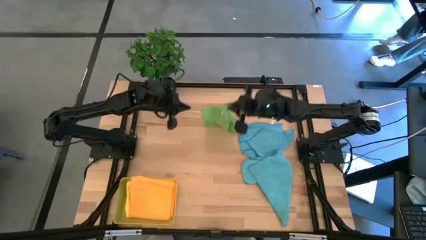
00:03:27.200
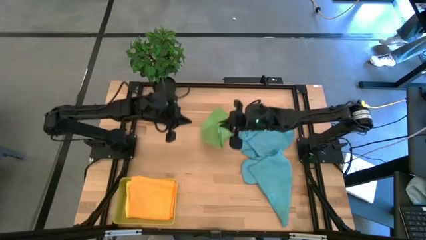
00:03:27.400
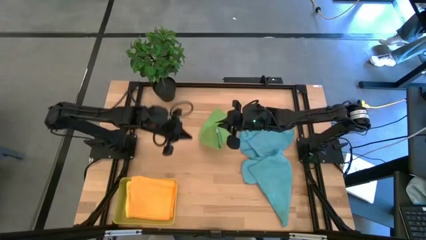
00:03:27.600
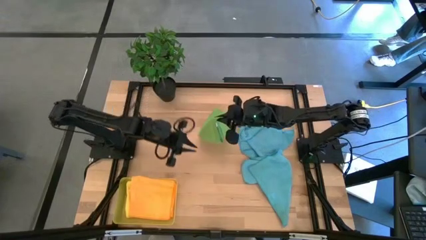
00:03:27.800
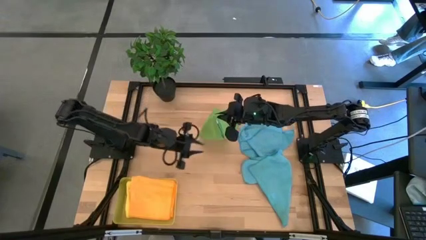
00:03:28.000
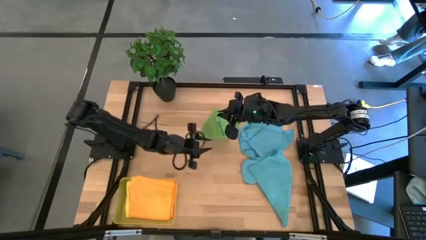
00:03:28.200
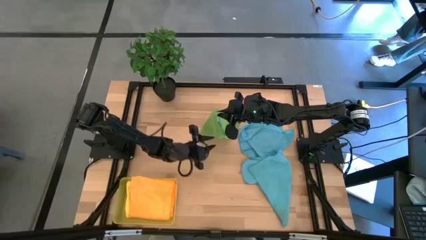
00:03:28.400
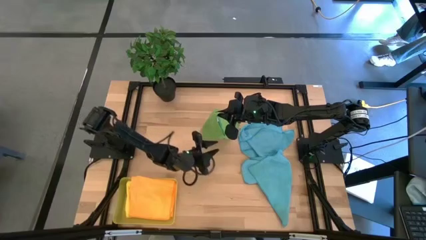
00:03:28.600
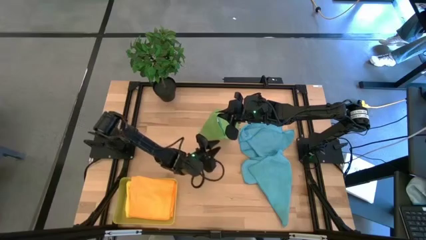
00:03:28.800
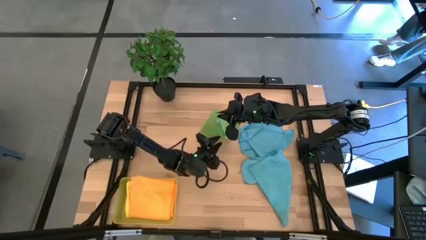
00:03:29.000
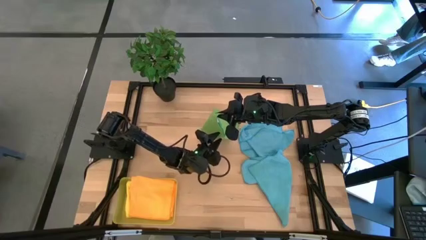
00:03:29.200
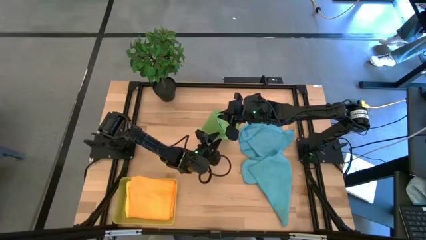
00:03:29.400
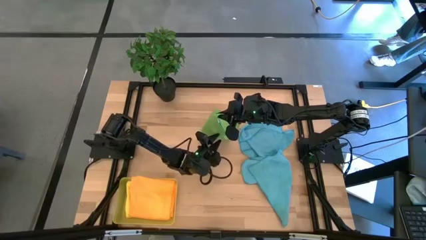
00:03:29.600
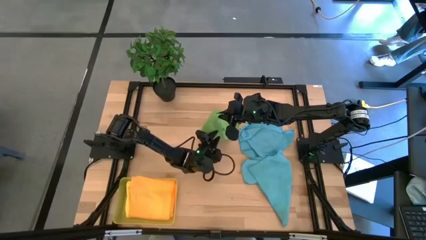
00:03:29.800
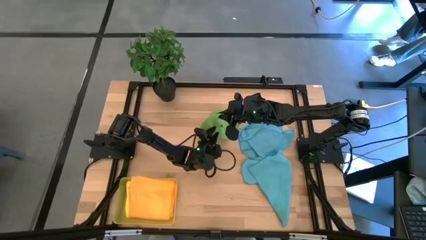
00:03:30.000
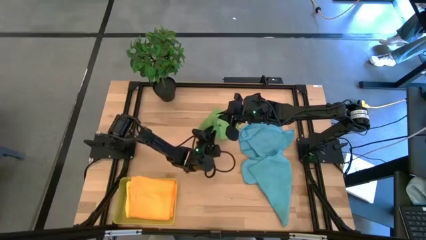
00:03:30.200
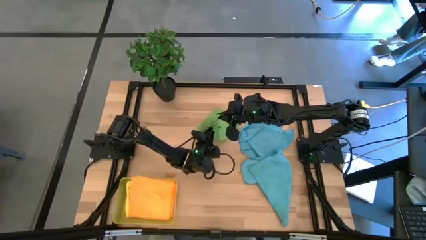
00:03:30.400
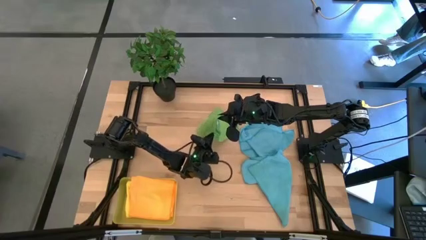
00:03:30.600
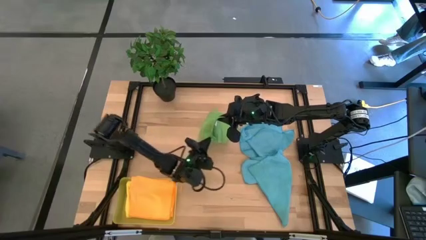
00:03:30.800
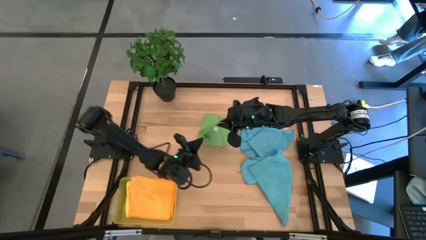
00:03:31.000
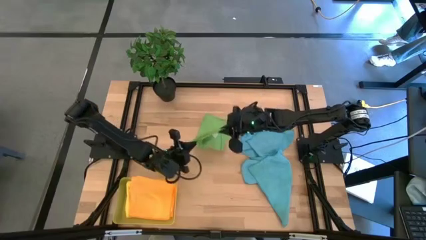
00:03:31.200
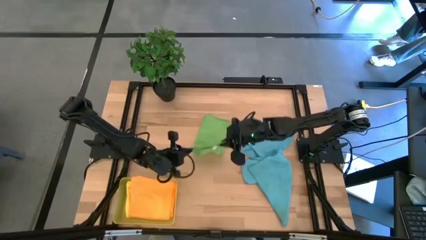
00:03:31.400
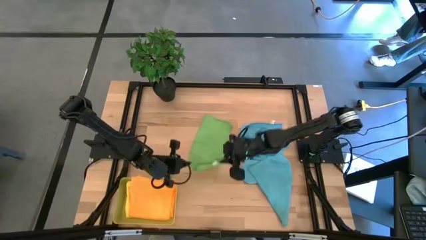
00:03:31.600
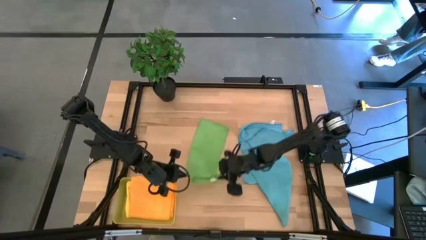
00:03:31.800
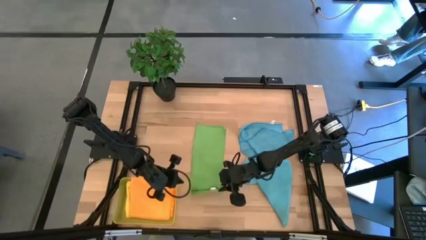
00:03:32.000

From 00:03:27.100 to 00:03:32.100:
Task: Fold microfiber towels
Fold the green microfiber cloth
